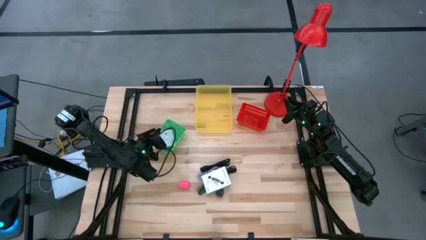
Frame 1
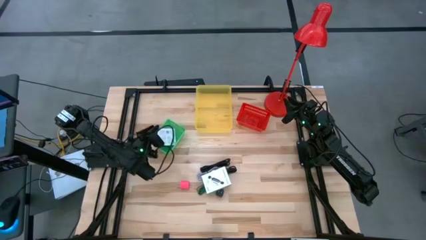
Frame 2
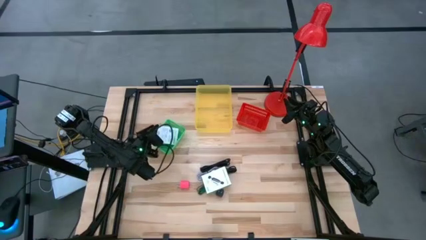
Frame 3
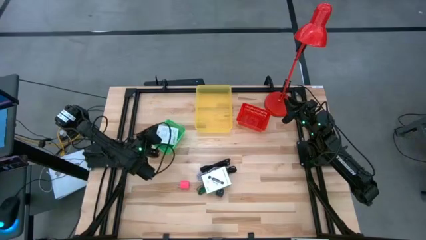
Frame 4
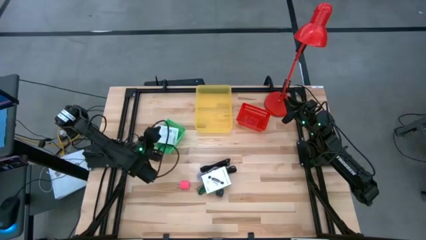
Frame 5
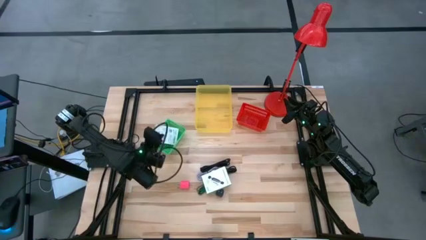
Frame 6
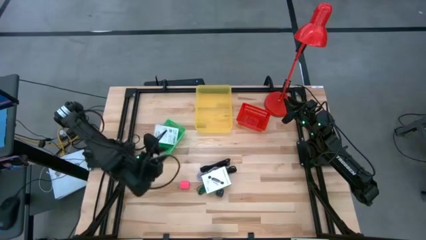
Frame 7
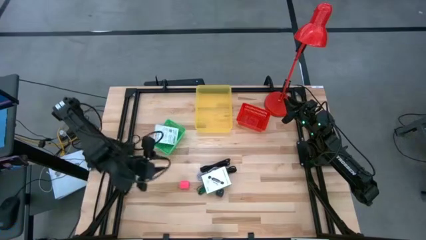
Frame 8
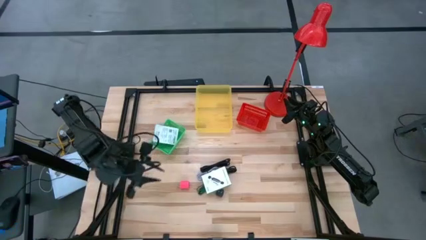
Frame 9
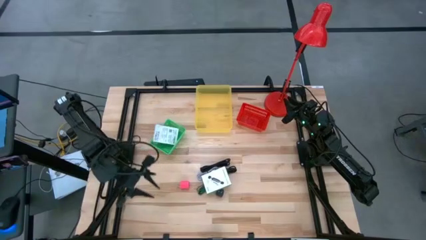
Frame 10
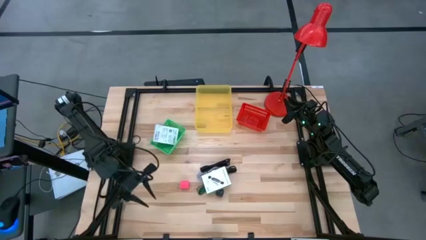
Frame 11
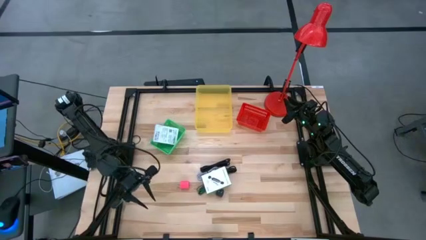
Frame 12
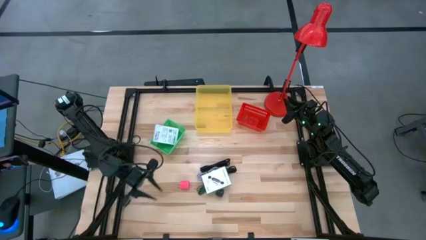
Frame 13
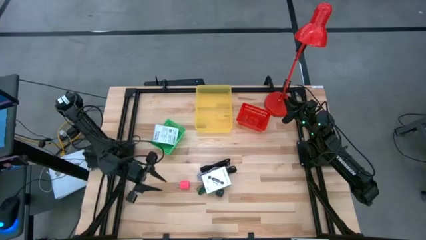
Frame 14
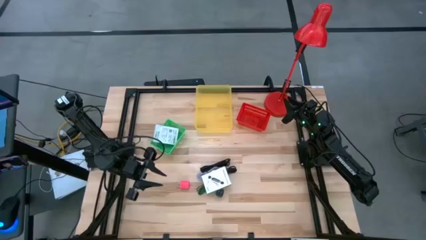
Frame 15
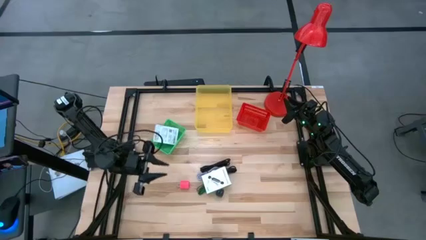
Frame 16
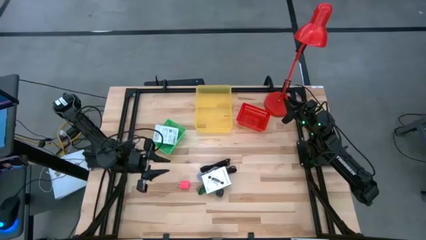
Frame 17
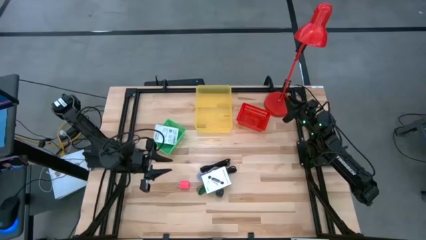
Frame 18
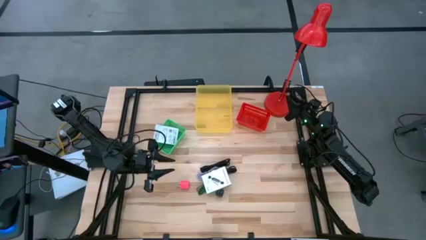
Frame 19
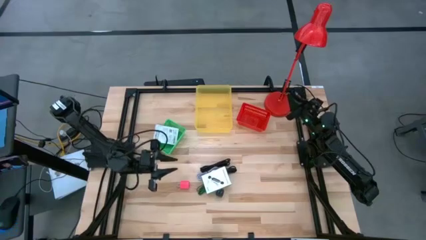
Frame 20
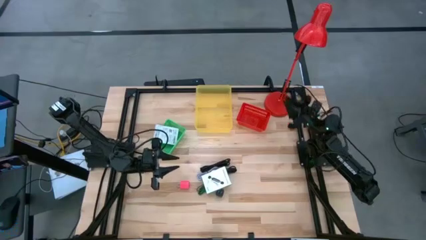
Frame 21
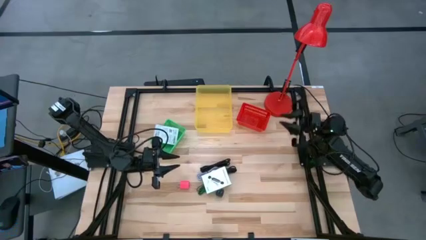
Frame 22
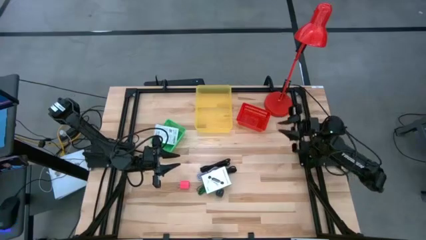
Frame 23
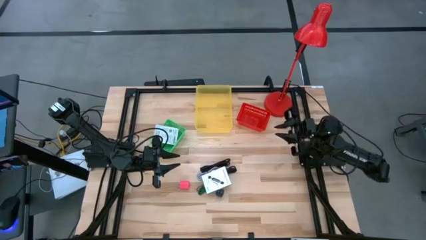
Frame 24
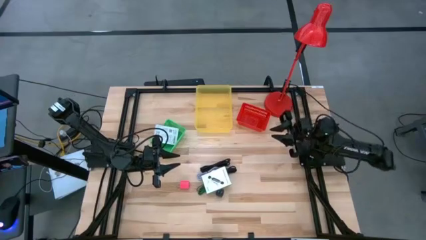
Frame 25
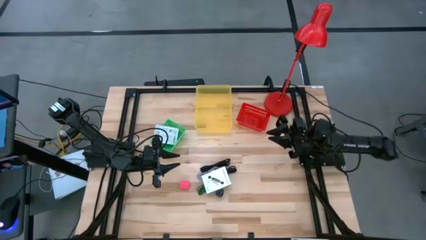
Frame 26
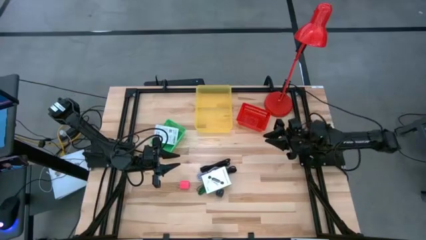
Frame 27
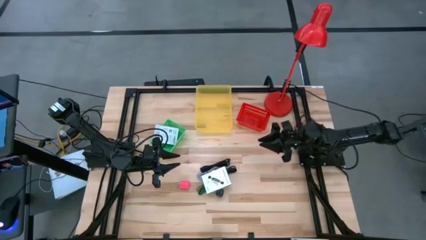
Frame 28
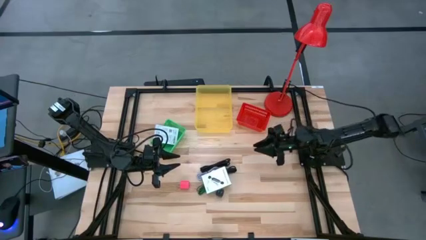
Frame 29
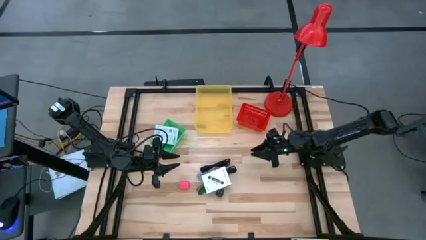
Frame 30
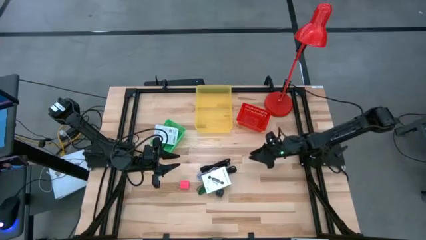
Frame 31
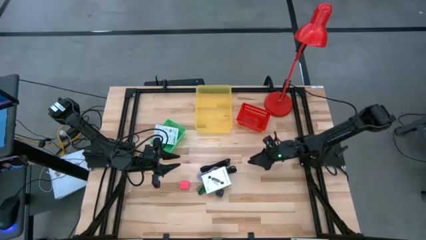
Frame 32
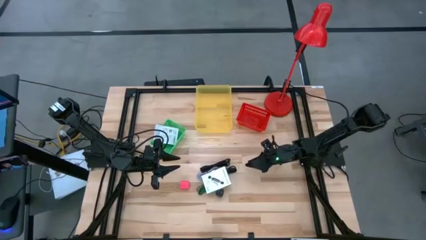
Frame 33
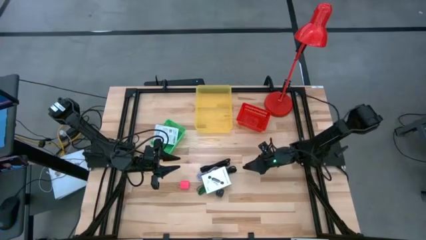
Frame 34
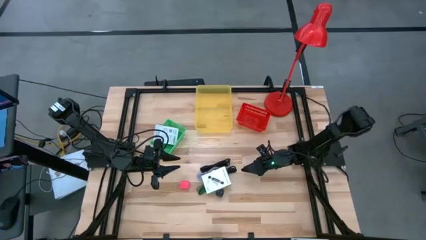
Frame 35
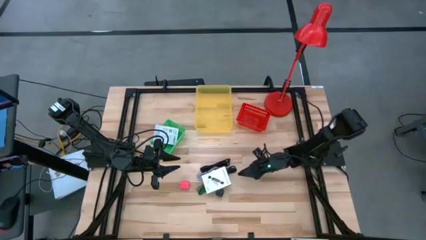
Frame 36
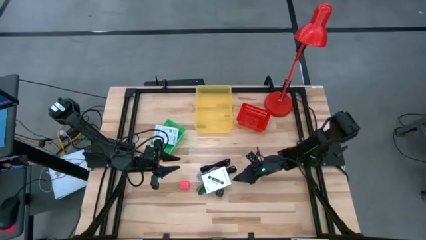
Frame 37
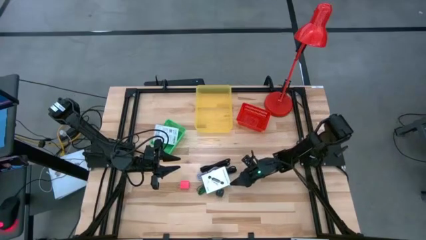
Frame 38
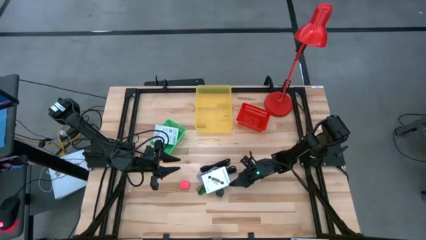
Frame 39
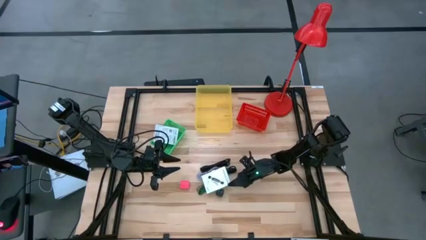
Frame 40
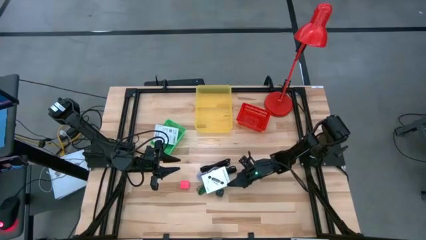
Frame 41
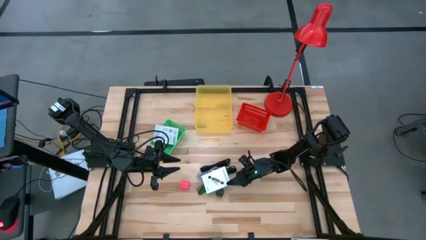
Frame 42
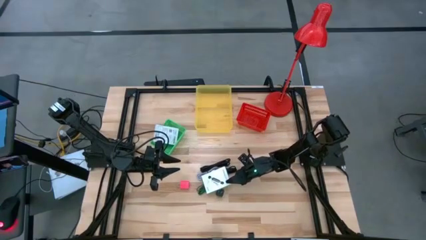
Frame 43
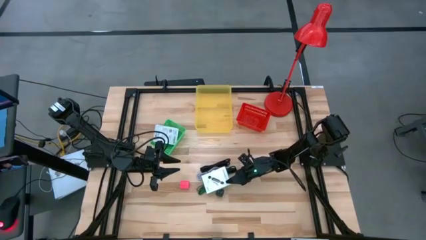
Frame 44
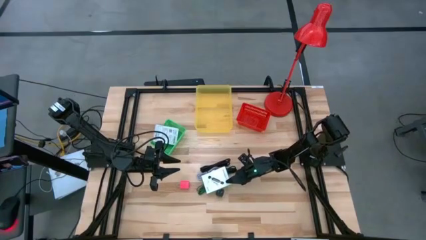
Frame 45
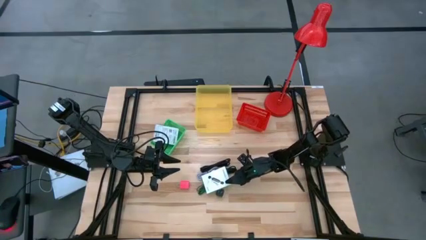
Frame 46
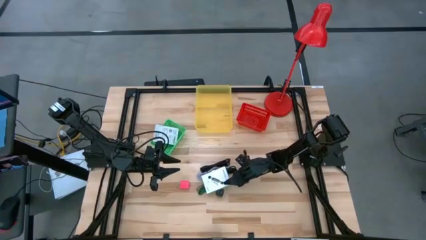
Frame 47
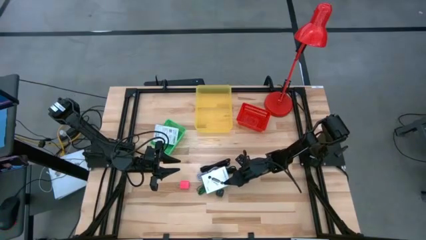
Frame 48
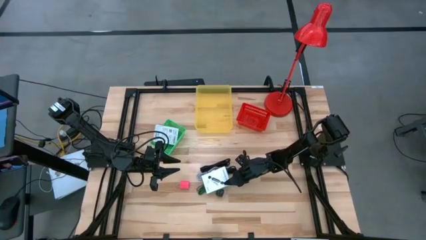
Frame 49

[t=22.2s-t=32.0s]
Task: Pick and place items into bin
Put the white box into the green basket
